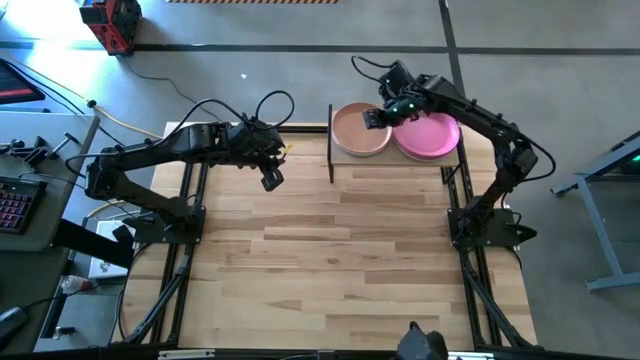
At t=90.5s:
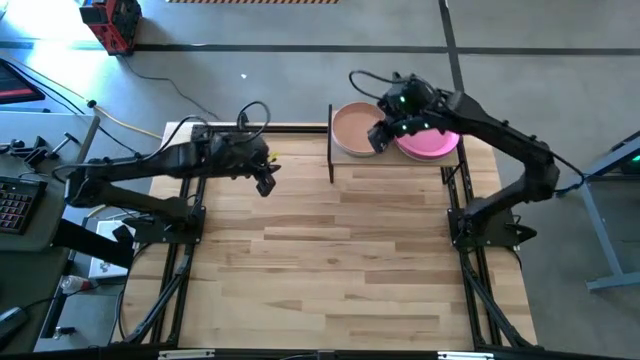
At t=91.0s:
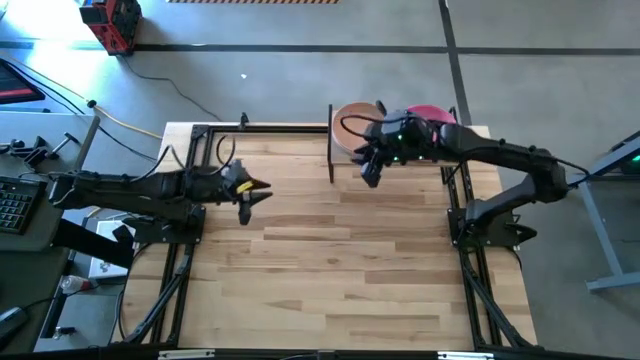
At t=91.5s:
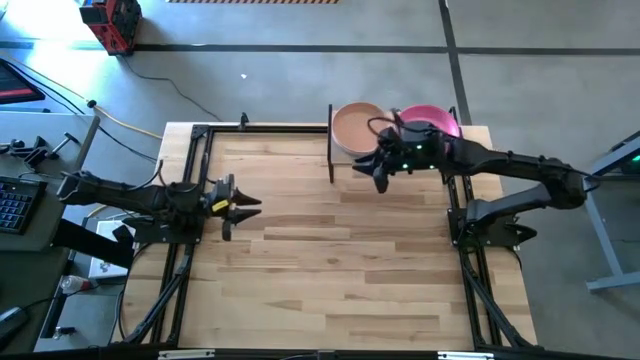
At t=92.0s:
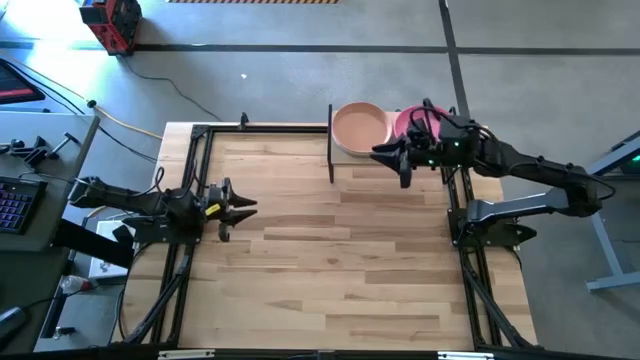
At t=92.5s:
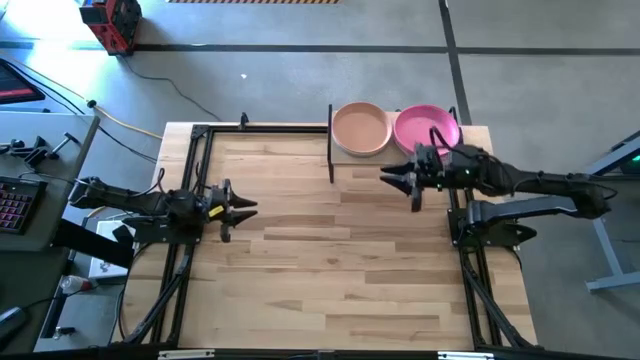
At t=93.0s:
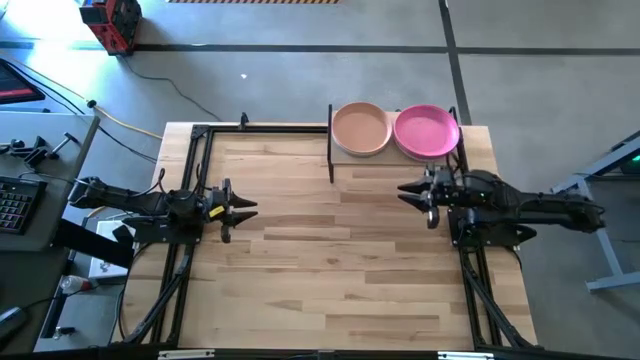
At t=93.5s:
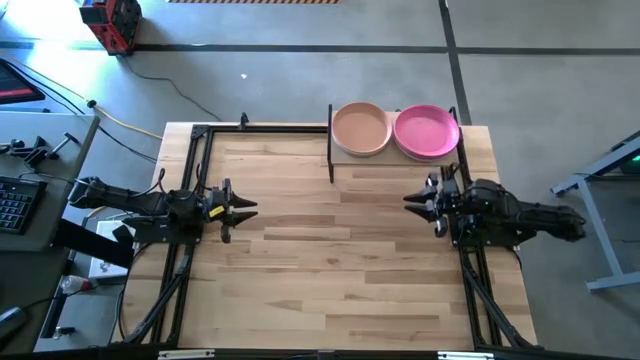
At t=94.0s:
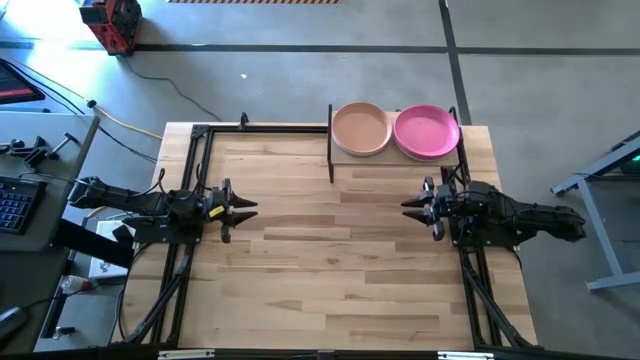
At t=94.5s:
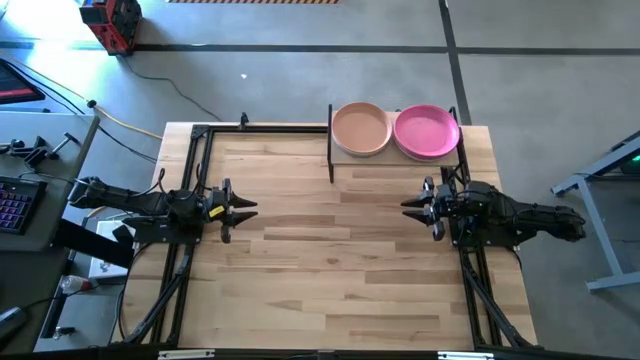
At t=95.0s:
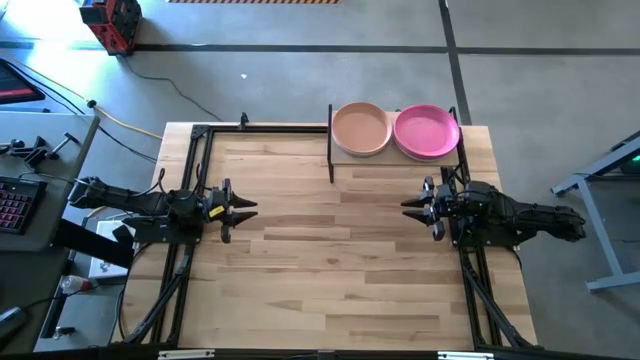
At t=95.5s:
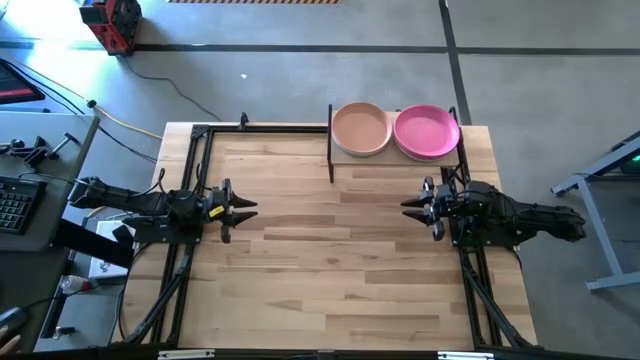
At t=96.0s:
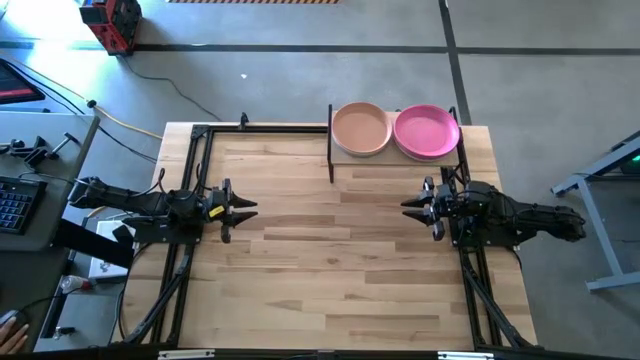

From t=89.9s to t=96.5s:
Task: Place and stack plates onto a shelf
Return to Home Position

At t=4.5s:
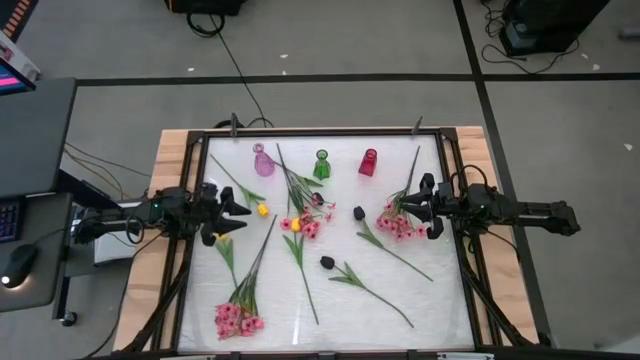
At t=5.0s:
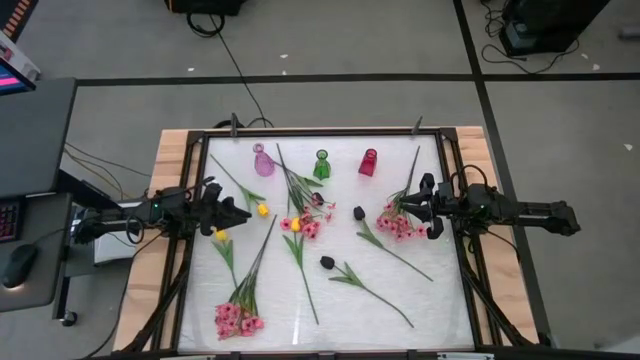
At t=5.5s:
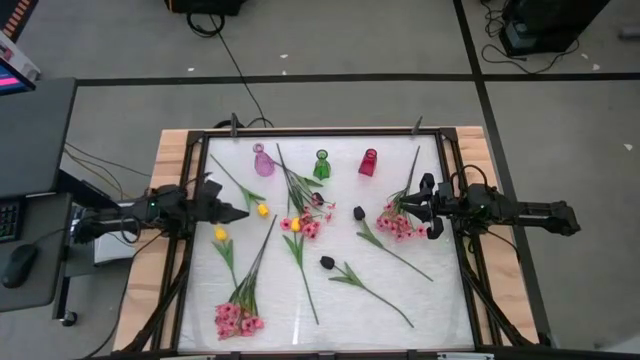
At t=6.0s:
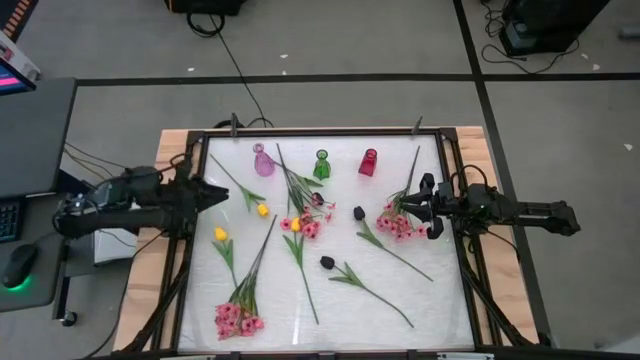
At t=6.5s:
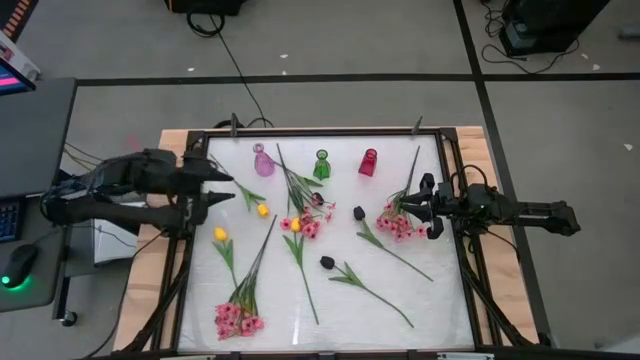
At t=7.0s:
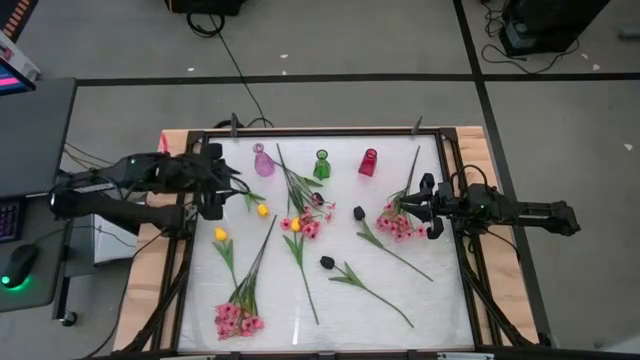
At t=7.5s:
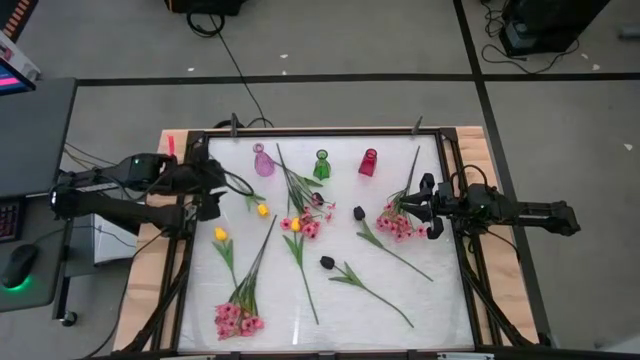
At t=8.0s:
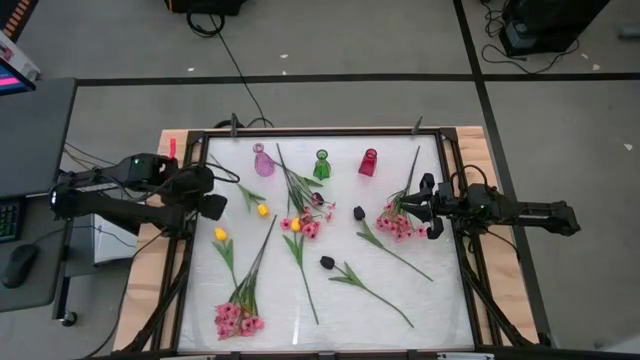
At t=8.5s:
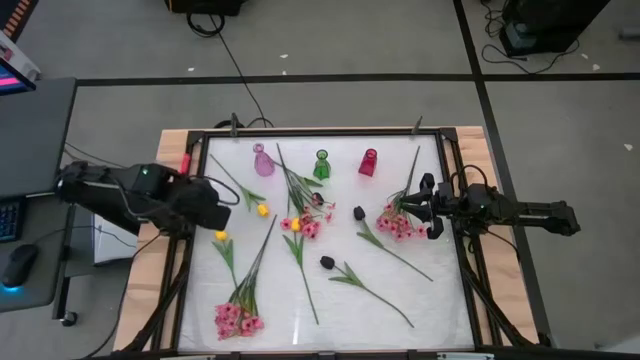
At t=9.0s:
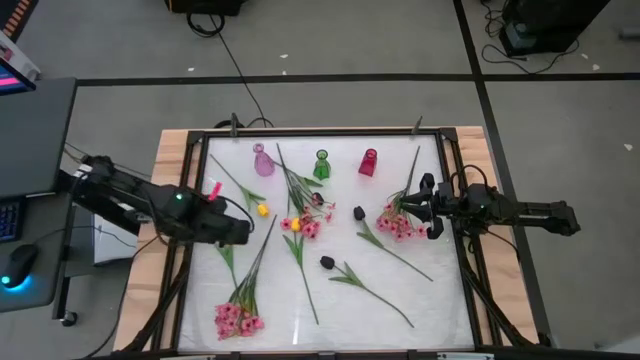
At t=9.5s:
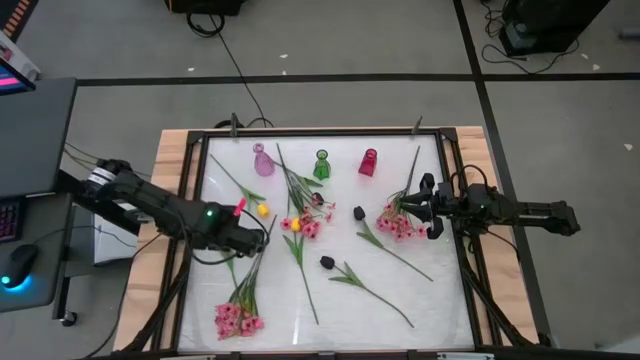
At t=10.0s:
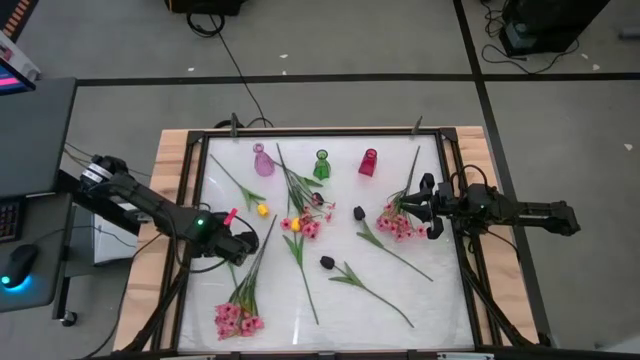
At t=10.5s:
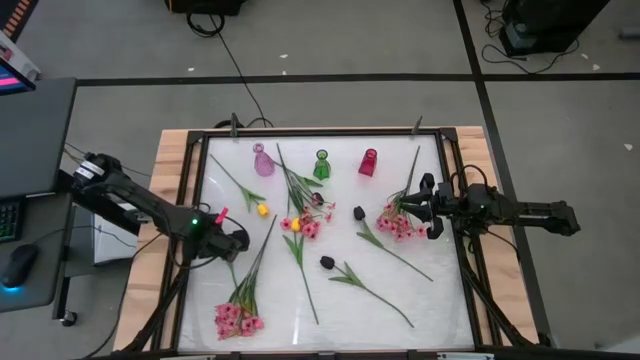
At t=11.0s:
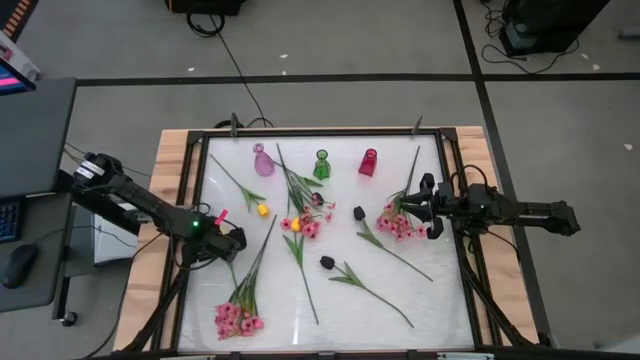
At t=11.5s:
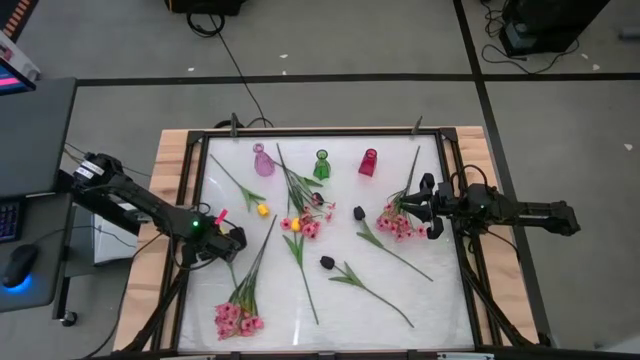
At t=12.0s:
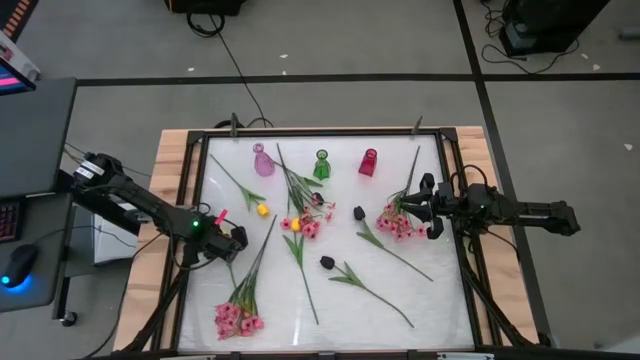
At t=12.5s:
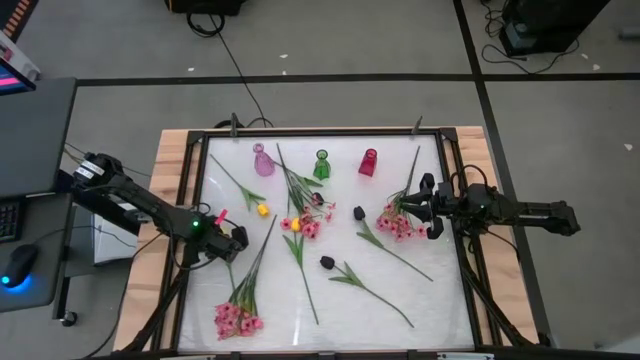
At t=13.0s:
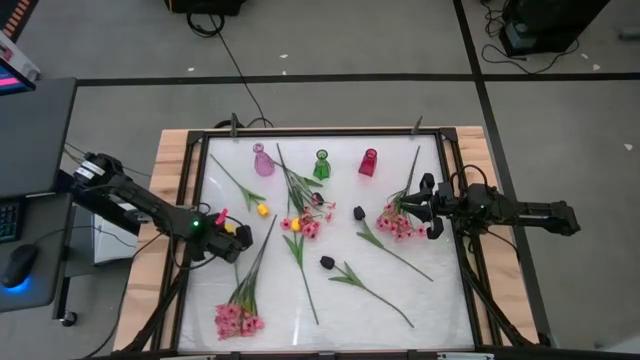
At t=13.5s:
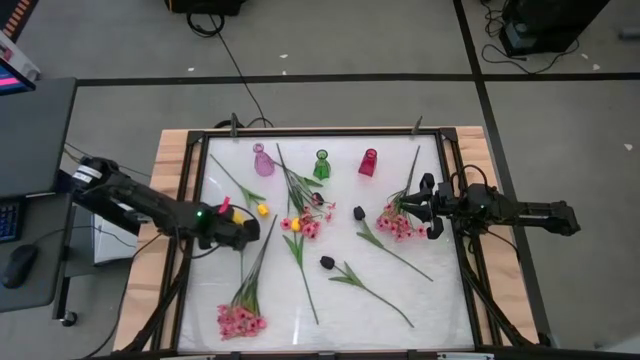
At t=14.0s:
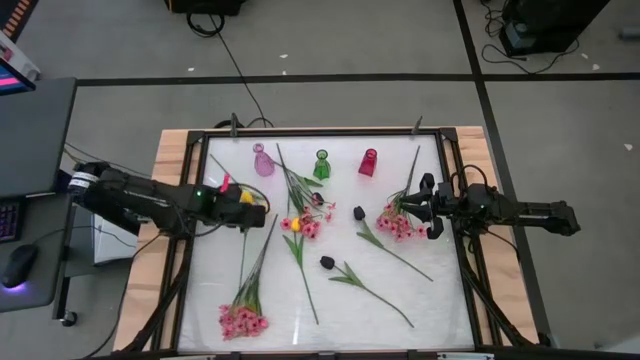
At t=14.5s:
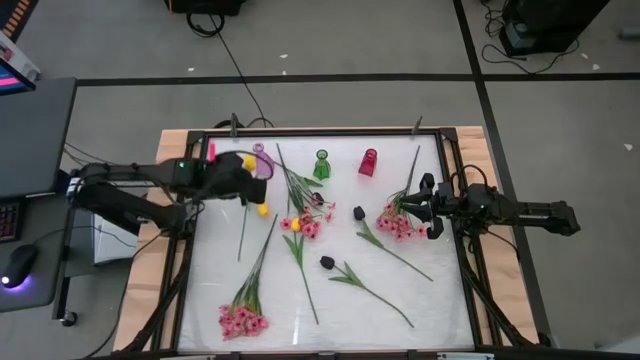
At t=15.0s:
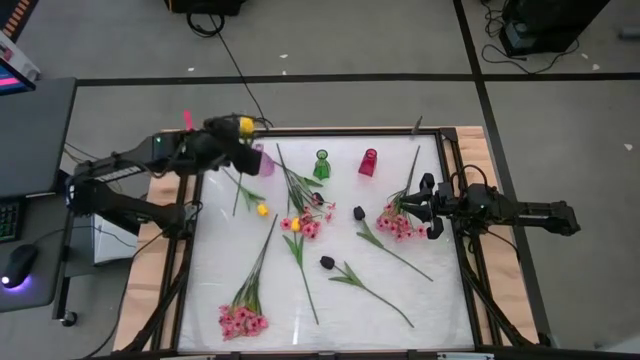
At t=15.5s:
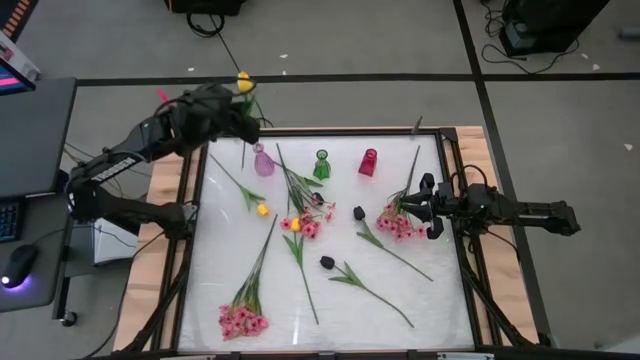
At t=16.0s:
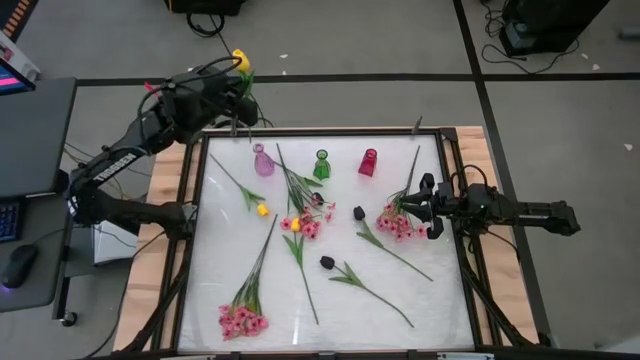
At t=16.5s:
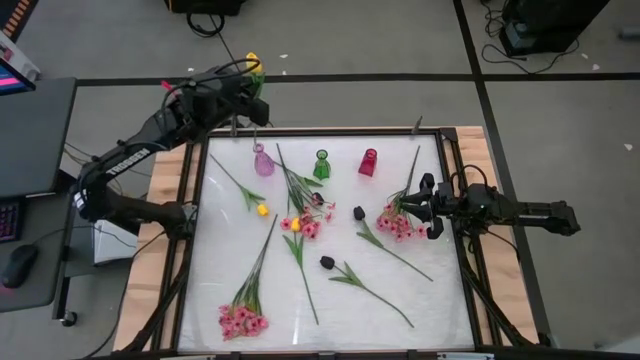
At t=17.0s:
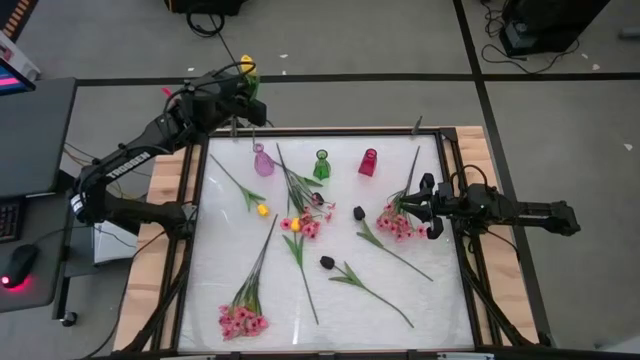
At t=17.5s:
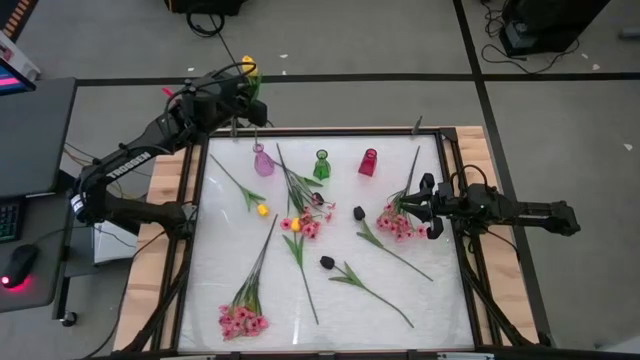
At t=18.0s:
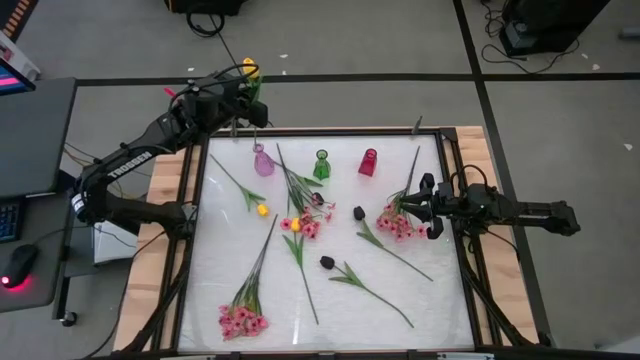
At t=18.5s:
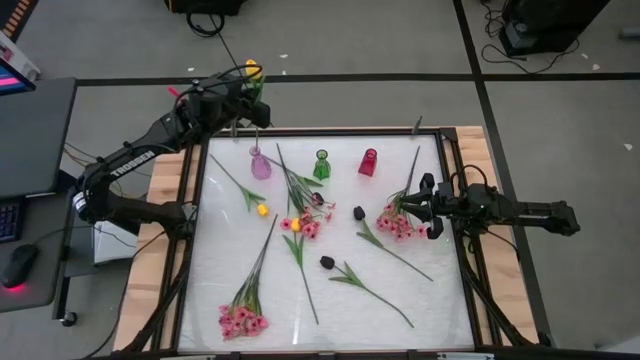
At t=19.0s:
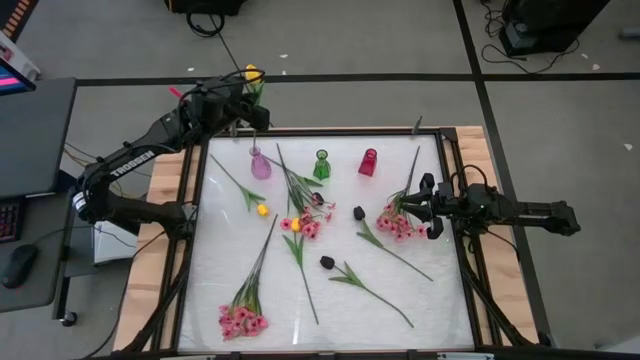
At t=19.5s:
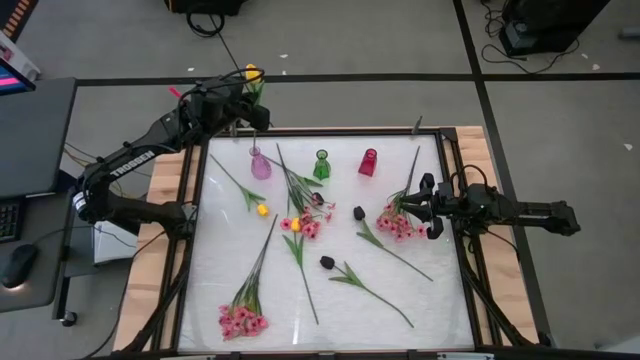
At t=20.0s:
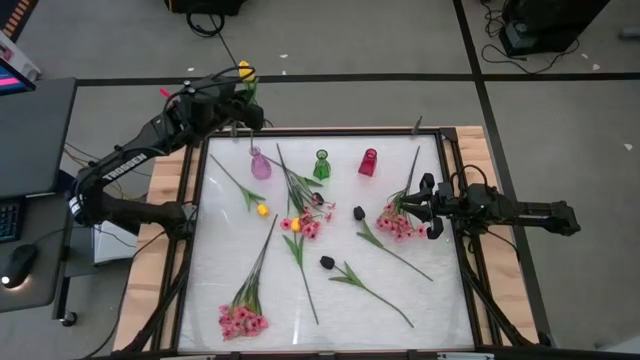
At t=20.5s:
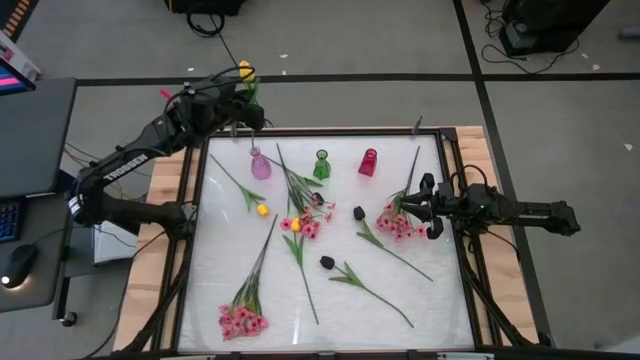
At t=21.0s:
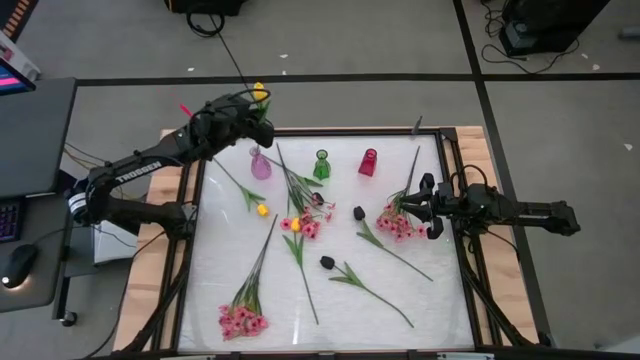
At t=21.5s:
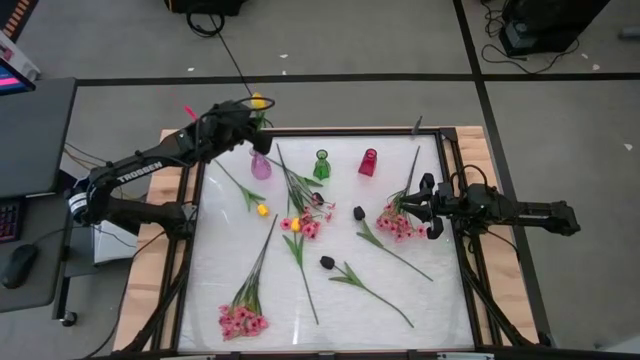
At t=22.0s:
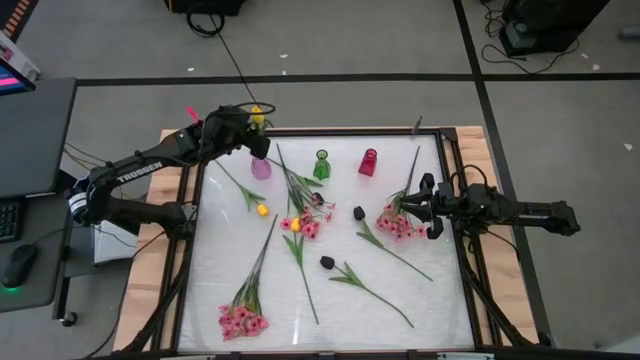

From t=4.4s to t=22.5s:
Task: Sort flowers into vase by color
Put the left yellow flower into the purple vase
